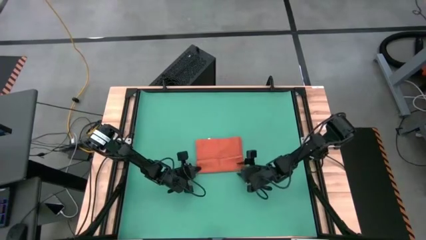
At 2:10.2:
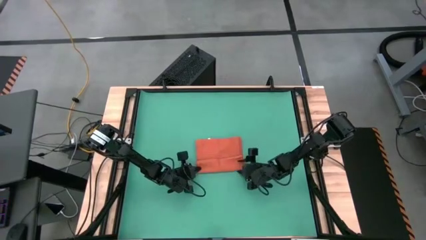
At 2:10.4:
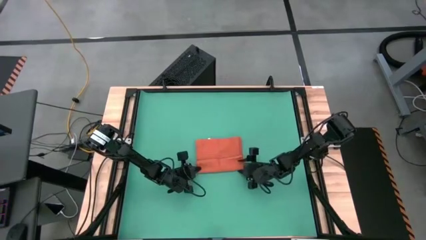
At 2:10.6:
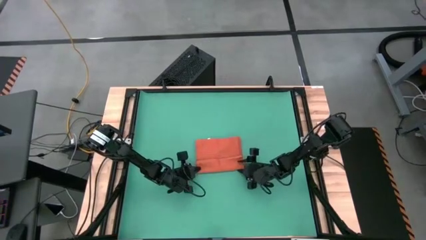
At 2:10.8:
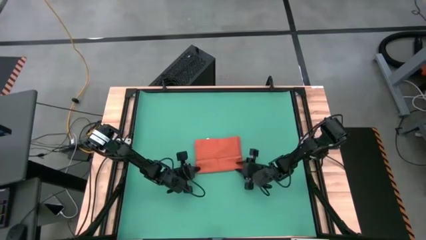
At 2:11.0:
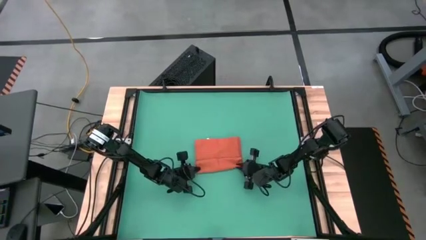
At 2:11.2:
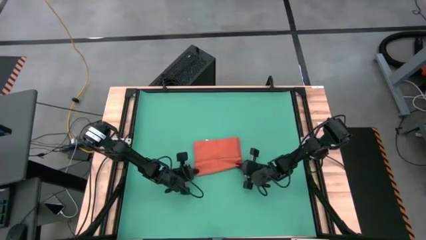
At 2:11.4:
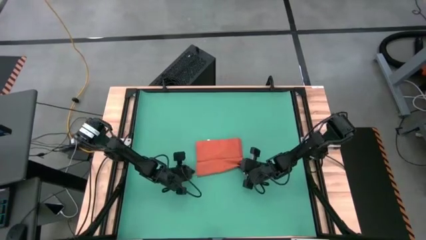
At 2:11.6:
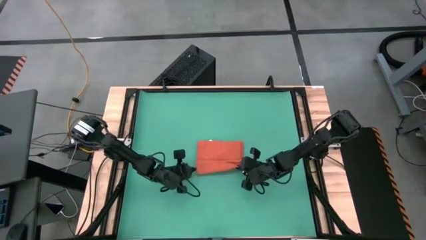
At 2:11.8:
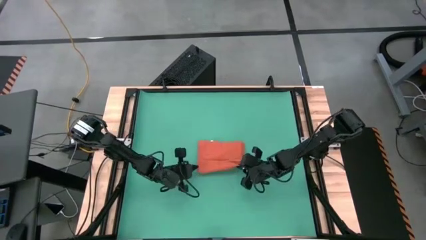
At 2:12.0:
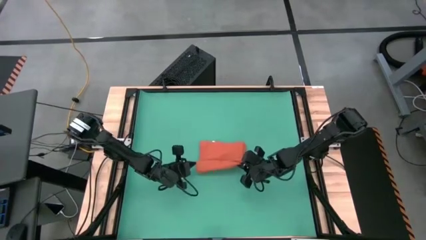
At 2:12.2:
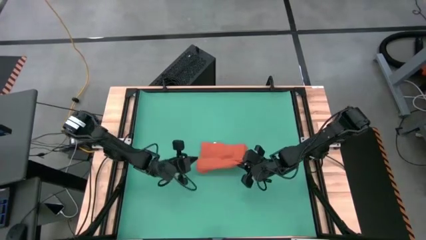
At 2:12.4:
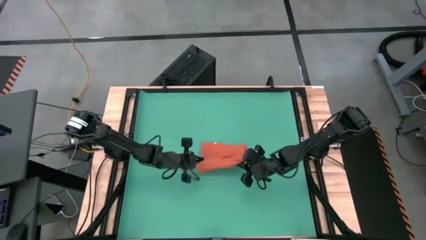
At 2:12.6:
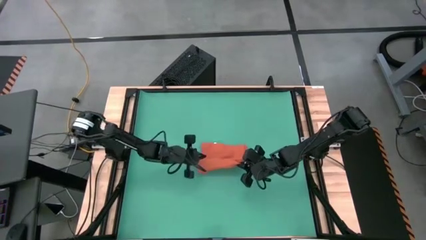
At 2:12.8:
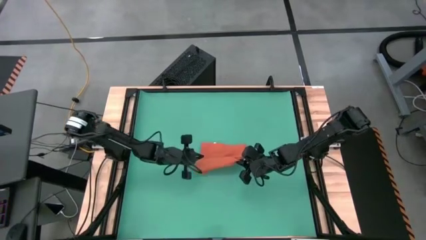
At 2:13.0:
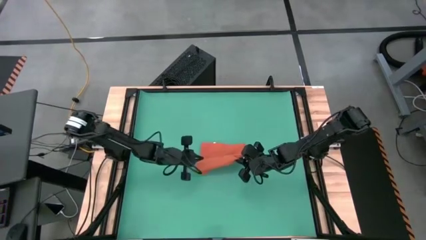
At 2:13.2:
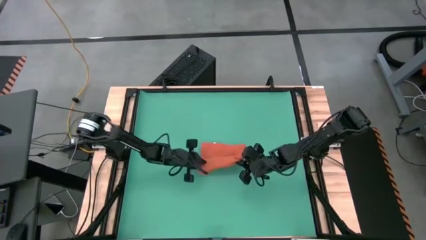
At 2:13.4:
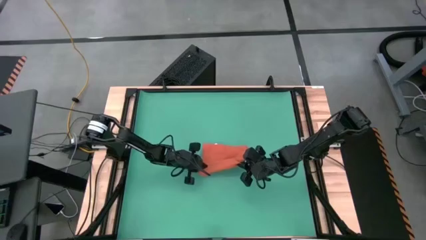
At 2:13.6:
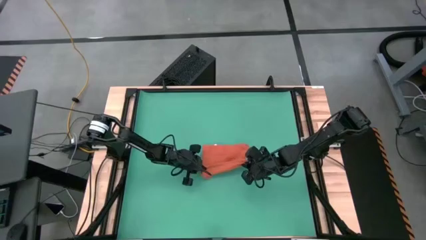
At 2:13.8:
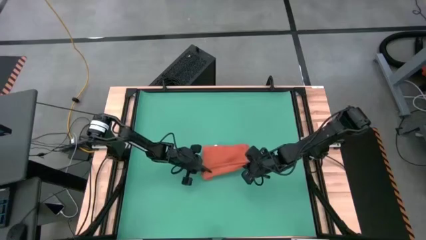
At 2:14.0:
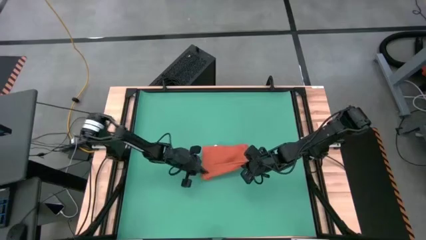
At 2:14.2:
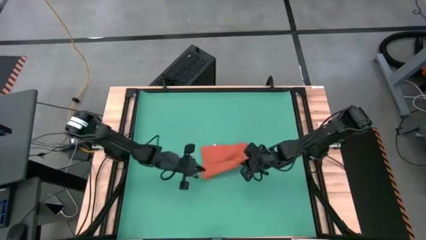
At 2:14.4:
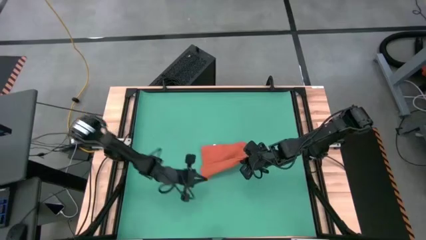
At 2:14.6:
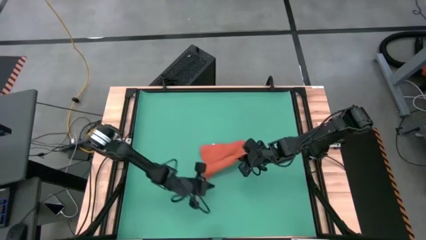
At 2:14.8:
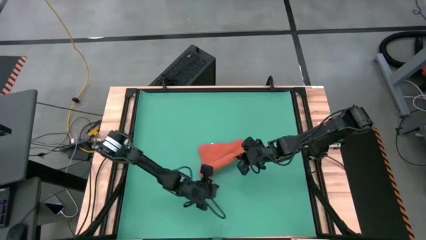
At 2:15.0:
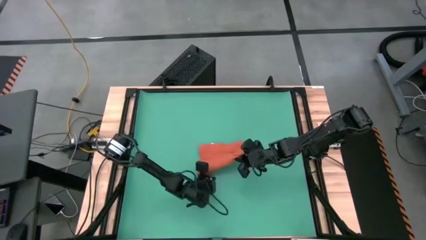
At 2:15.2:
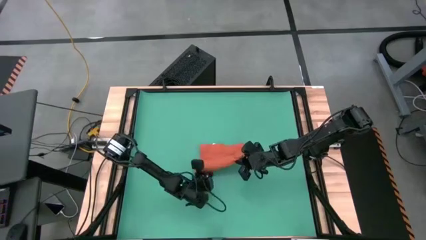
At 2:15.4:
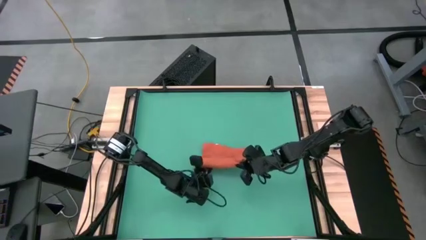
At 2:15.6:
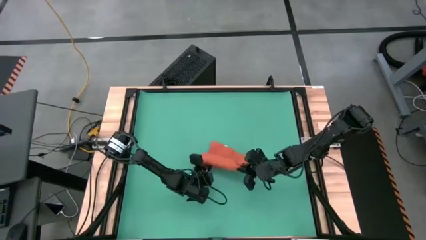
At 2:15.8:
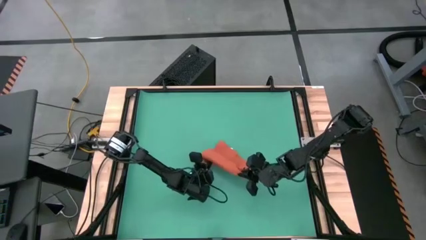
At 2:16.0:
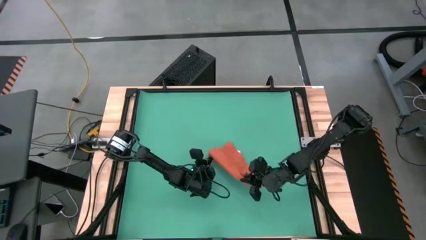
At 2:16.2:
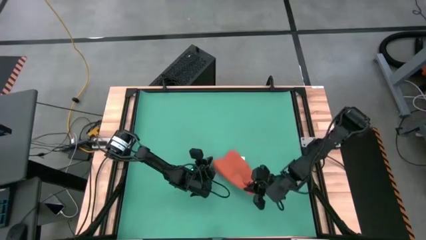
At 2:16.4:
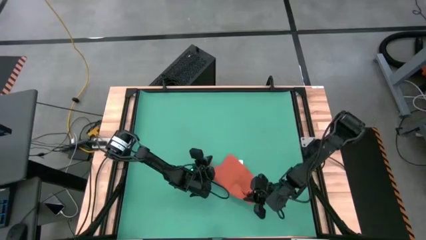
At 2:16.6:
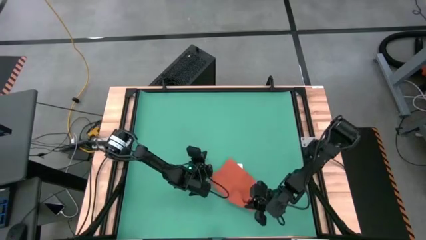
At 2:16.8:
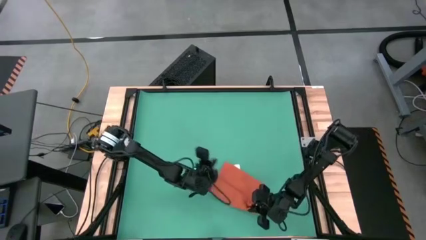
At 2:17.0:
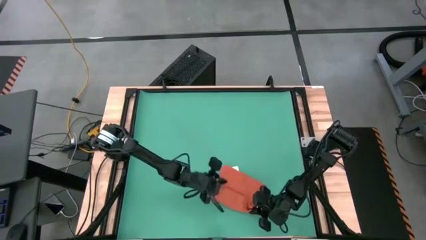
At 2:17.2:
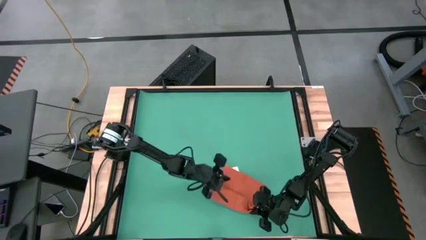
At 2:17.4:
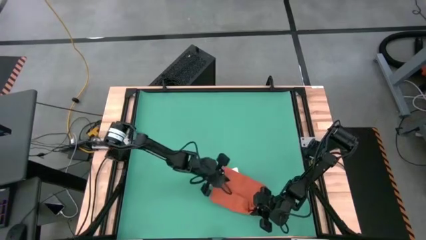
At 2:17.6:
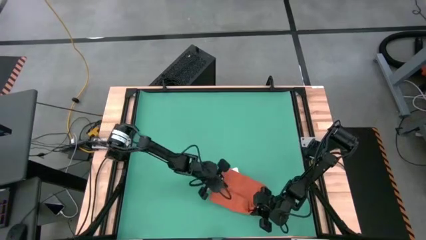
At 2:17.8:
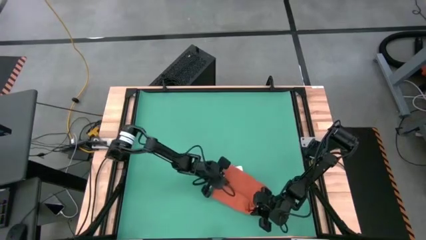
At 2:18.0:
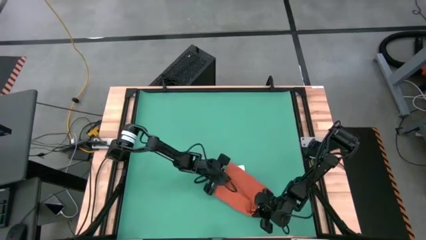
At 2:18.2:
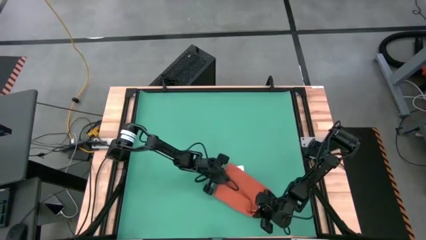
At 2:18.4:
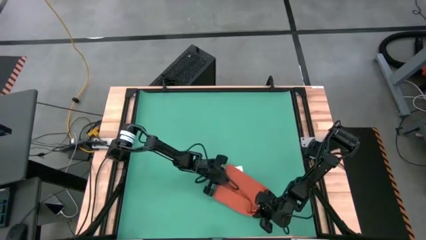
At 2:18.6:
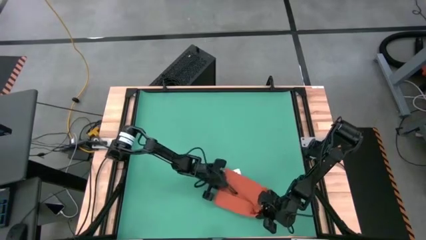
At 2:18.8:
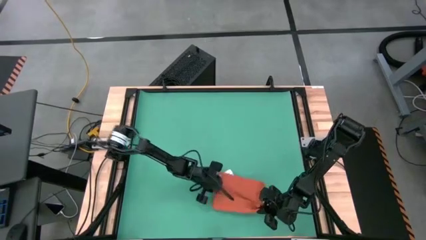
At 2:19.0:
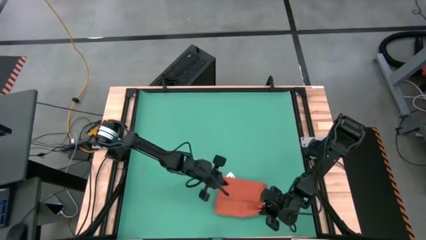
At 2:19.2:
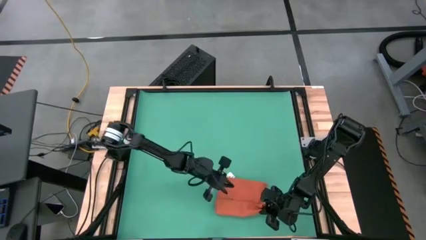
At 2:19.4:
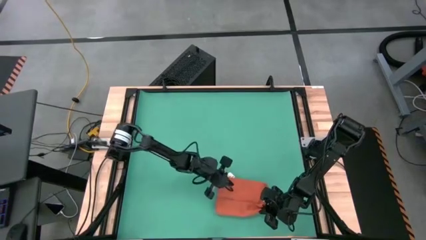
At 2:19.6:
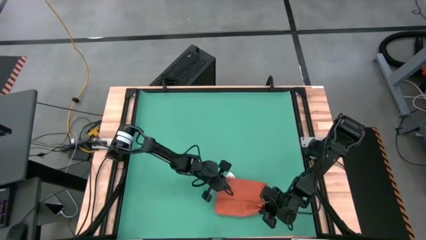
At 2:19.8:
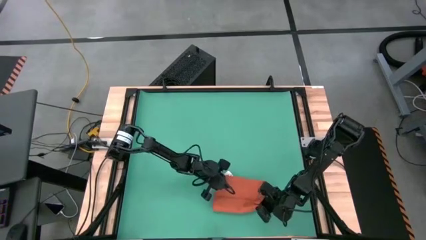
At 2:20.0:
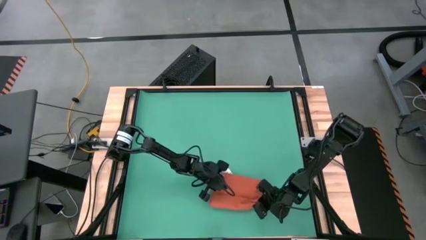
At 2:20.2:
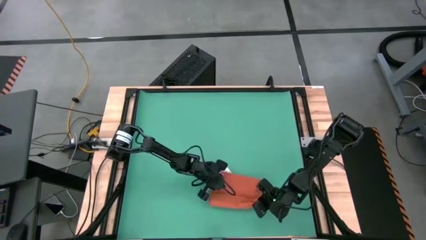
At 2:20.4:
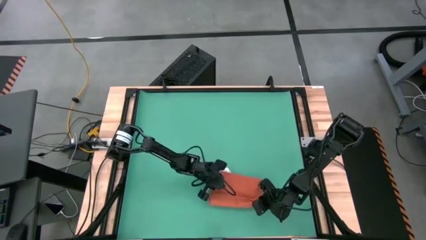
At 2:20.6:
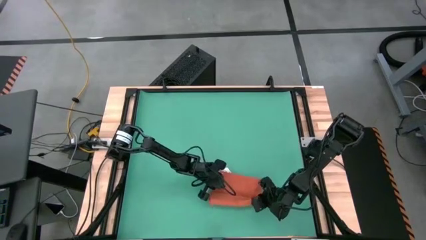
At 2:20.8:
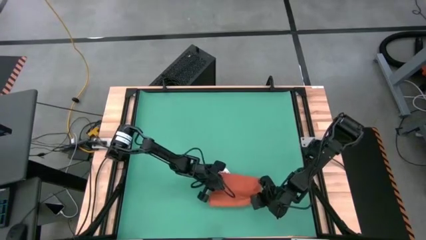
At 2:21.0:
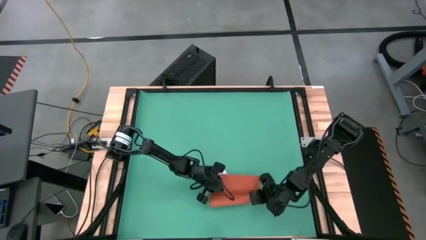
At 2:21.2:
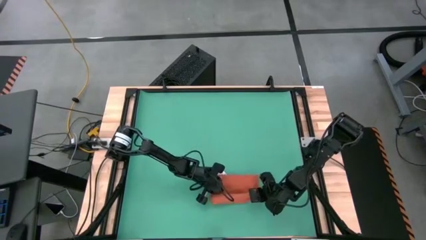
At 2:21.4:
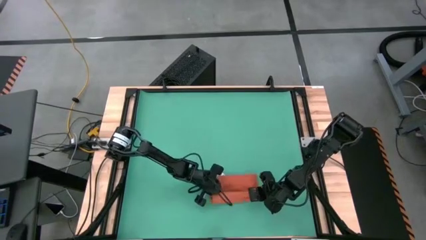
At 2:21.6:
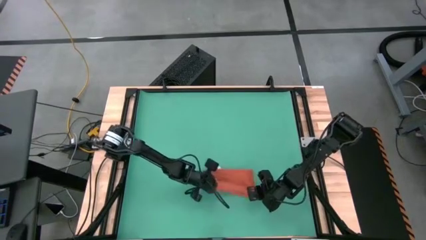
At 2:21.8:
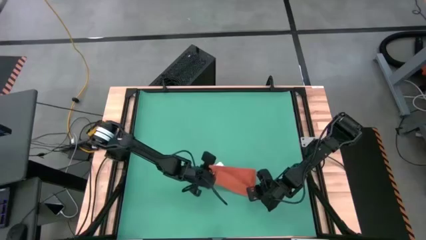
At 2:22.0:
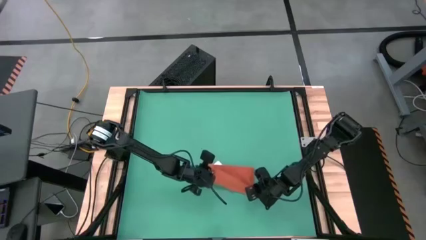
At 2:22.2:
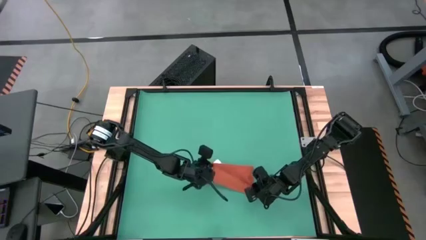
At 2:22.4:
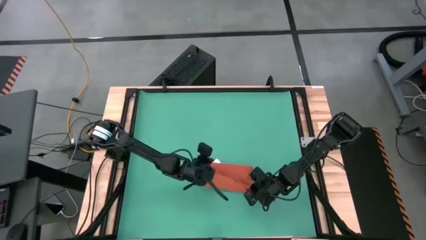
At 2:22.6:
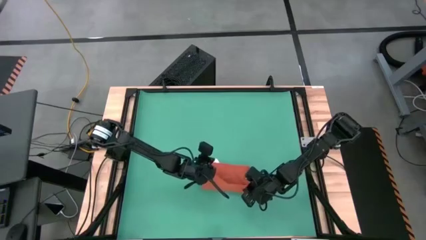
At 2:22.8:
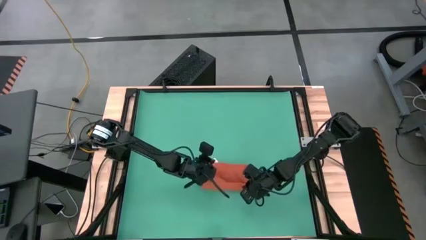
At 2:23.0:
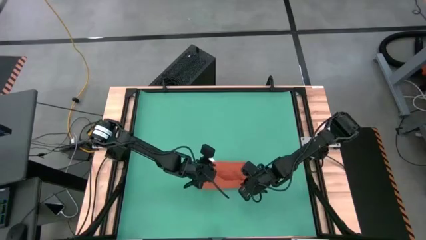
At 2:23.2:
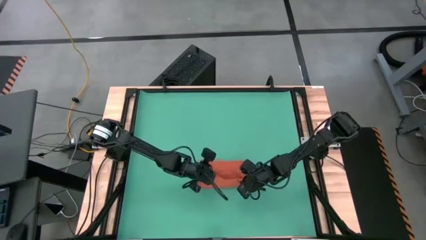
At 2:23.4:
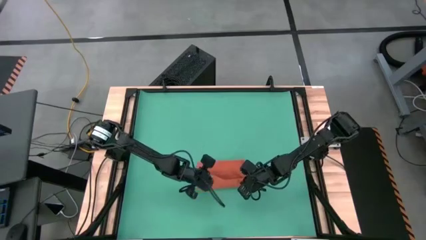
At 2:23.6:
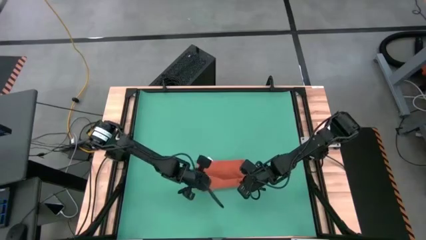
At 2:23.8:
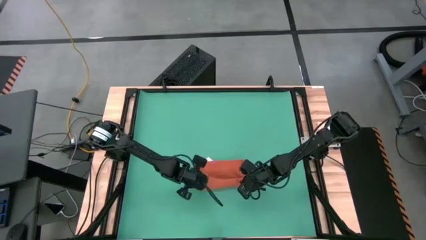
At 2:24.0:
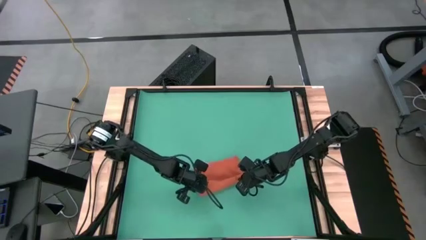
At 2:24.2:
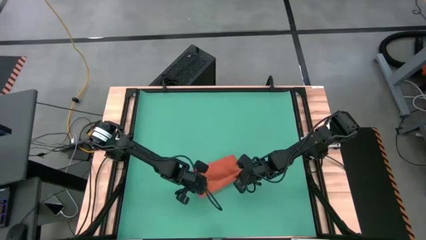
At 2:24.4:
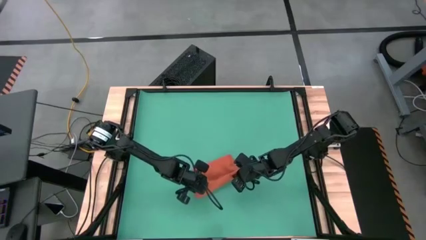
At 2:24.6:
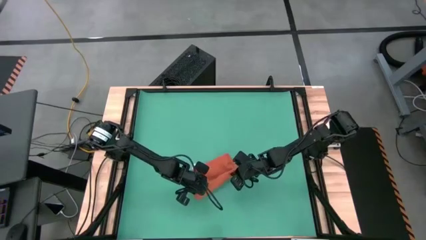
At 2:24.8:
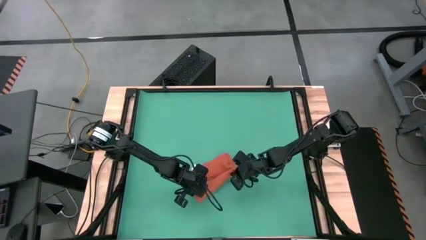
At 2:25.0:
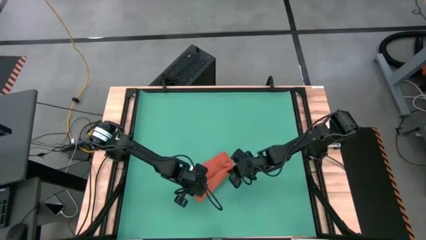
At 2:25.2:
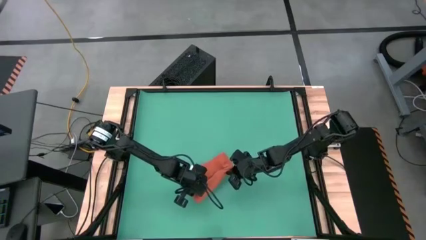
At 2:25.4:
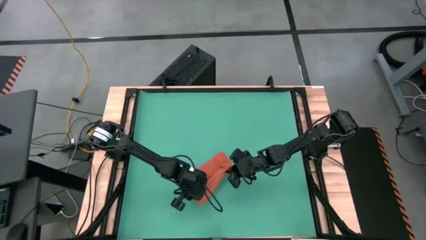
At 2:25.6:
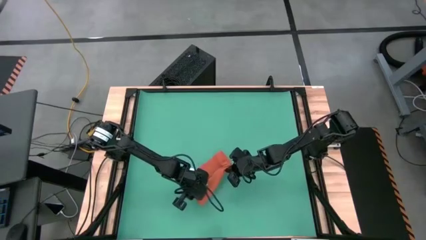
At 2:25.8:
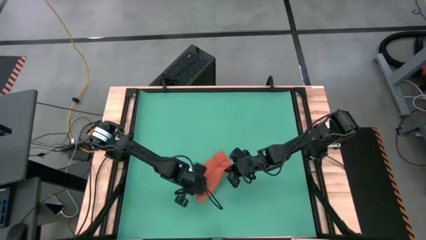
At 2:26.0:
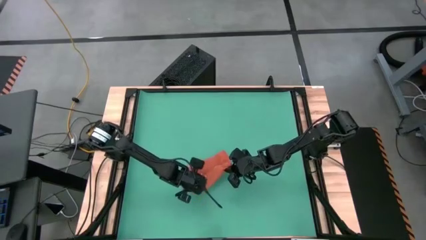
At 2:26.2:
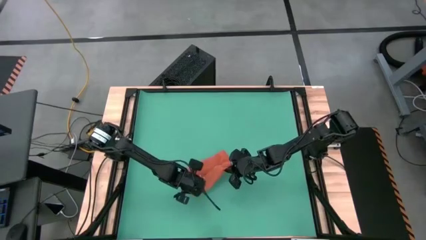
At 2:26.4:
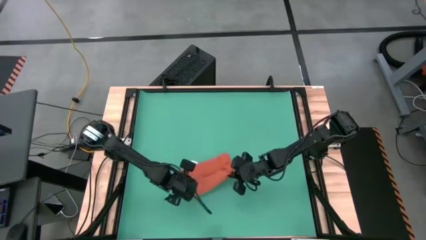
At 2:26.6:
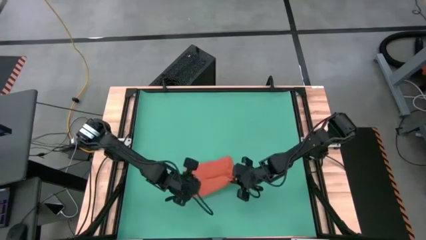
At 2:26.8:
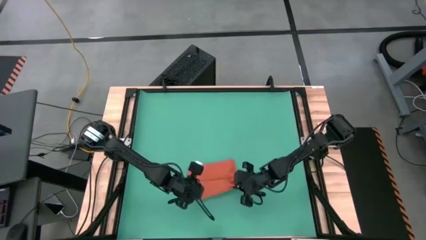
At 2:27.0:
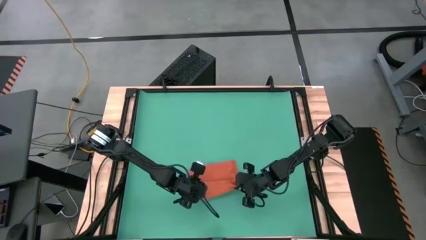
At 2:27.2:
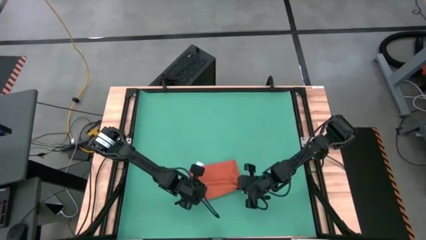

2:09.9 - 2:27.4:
Task: Roll towel
Roll the orange towel
